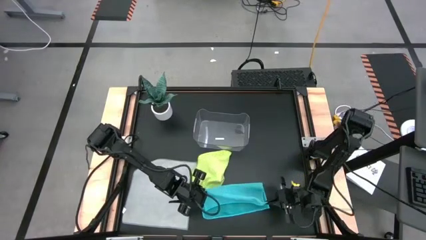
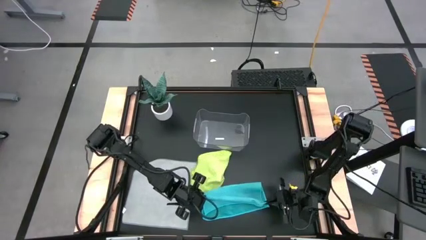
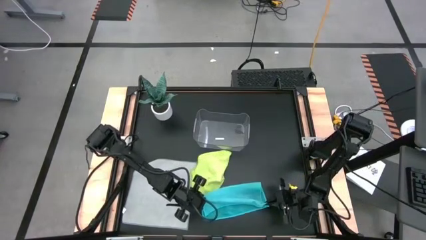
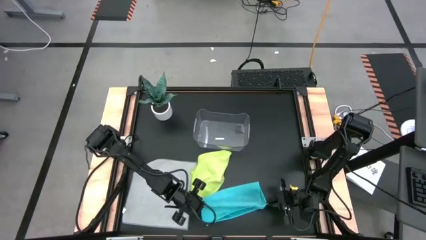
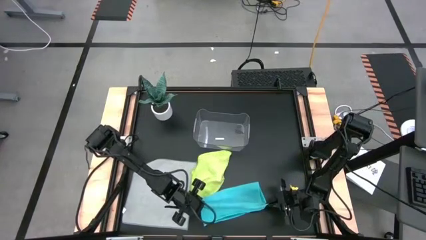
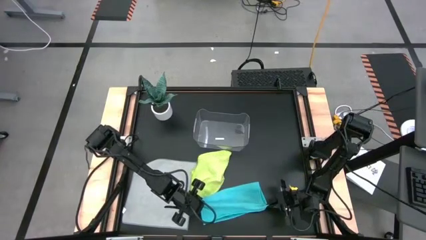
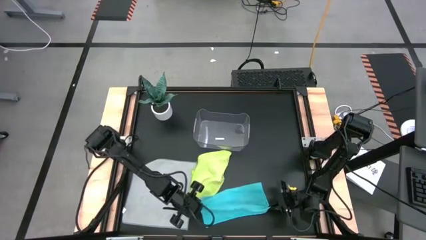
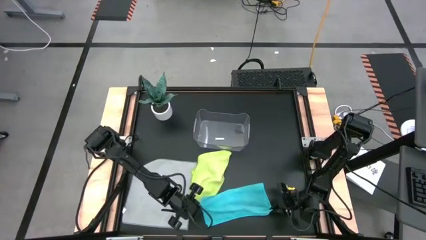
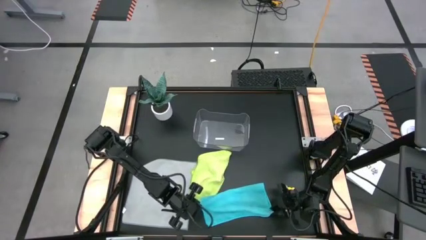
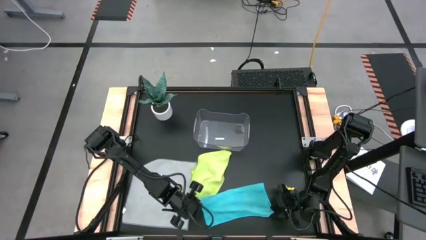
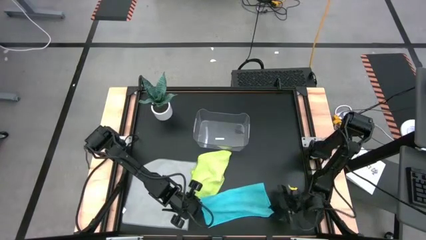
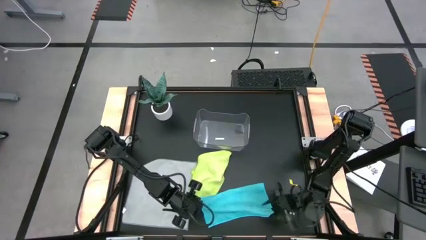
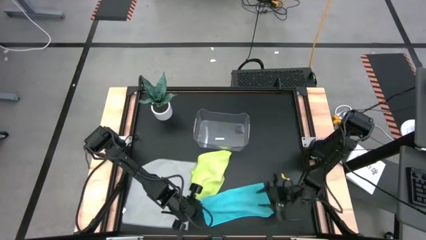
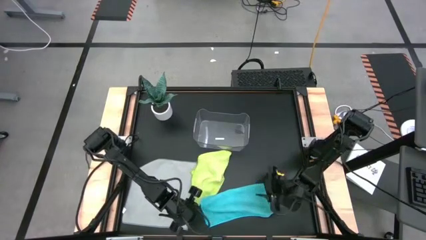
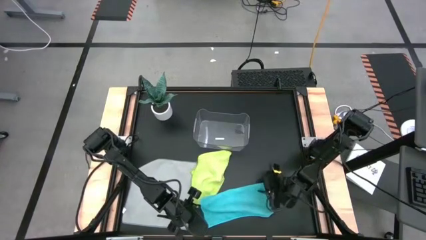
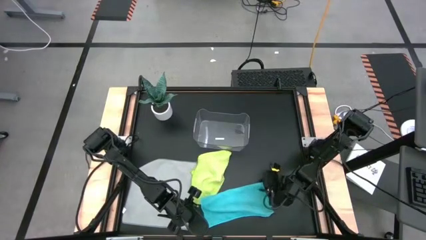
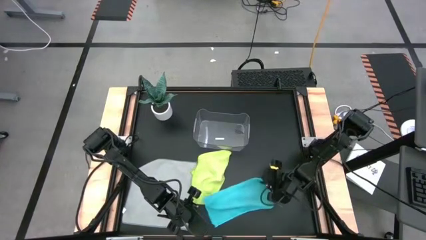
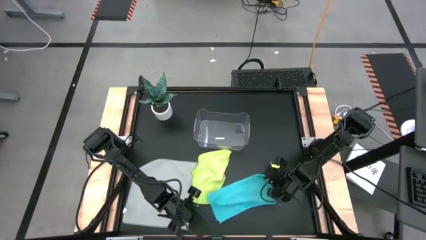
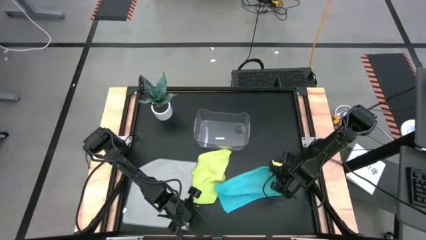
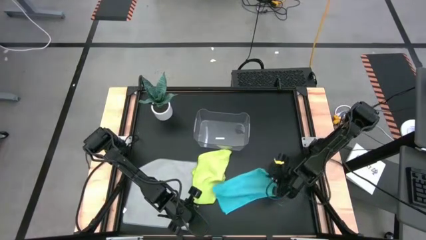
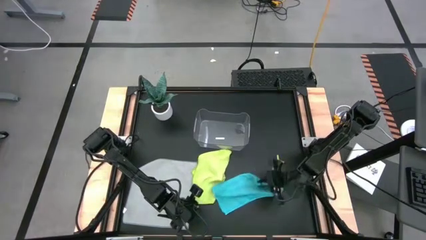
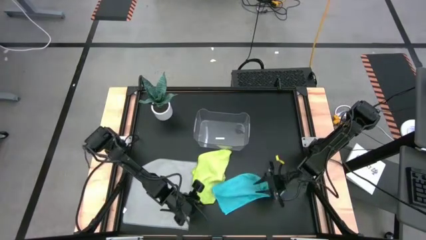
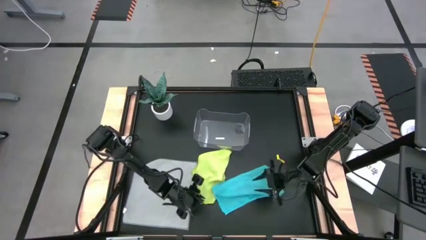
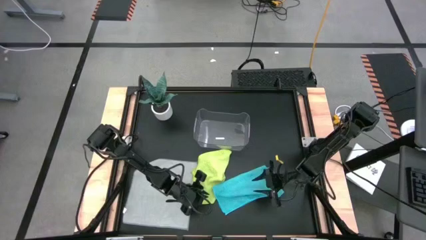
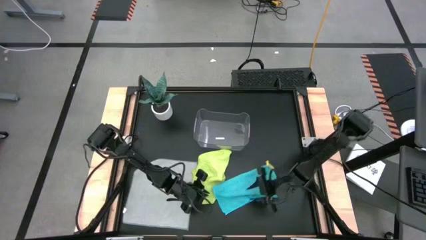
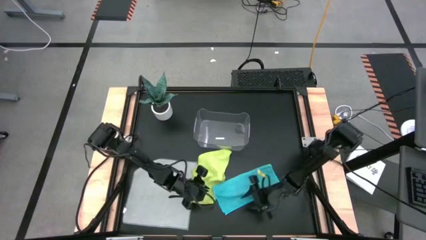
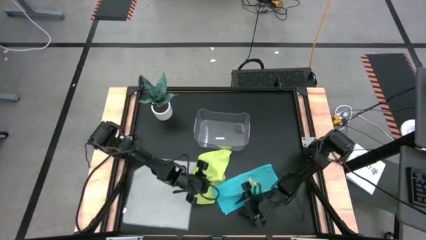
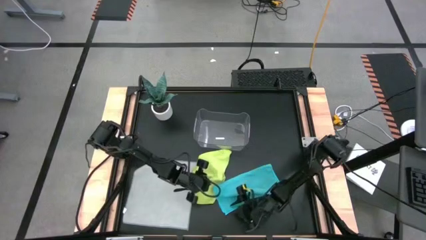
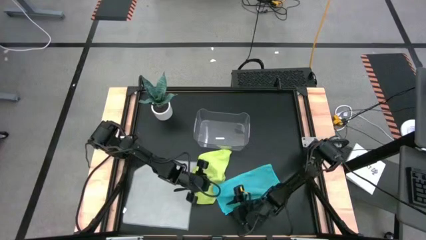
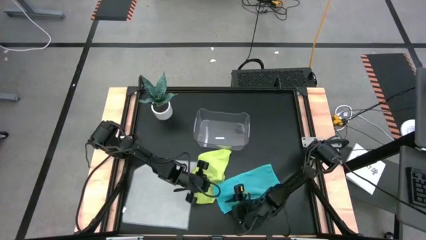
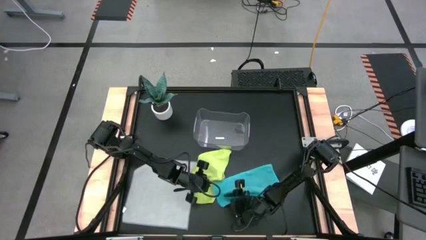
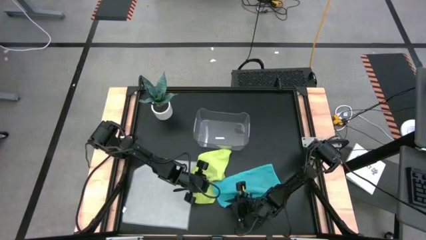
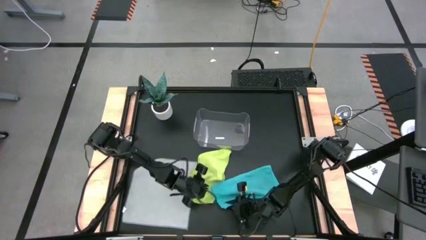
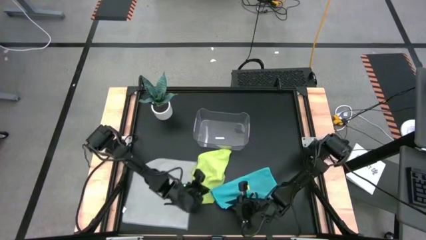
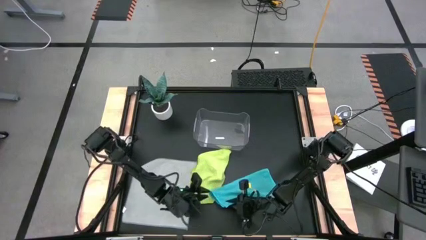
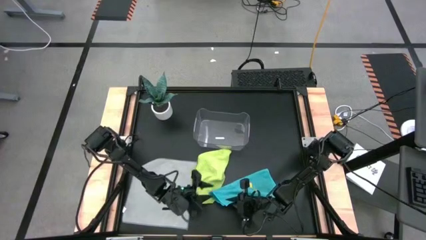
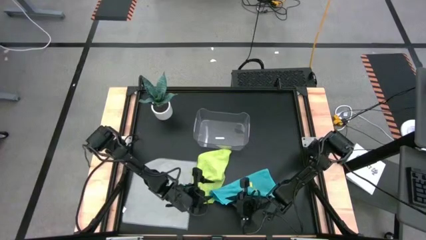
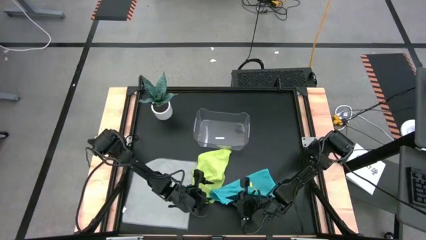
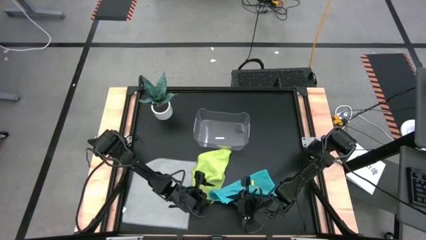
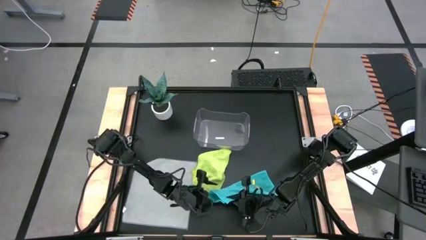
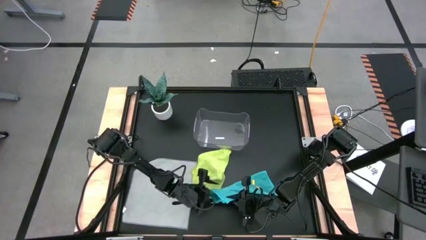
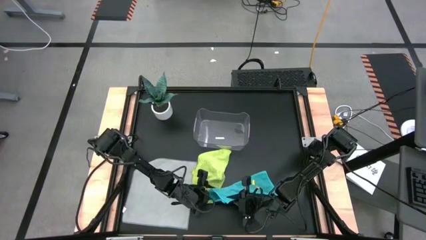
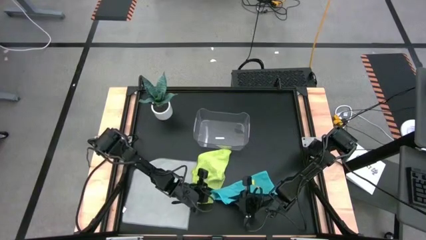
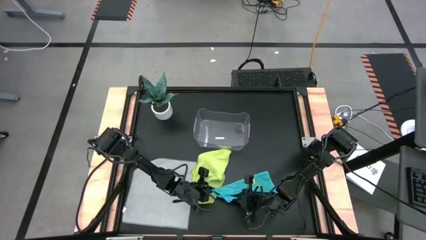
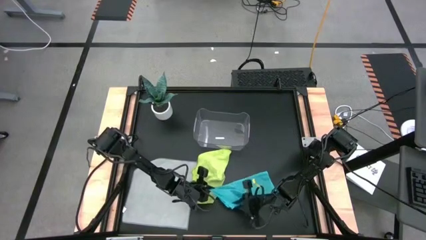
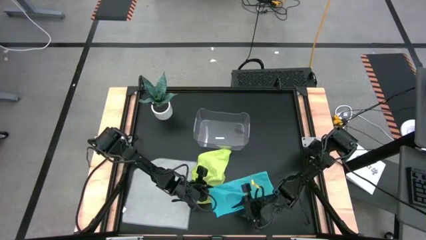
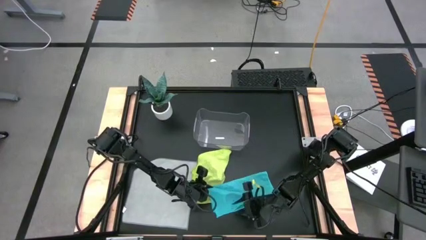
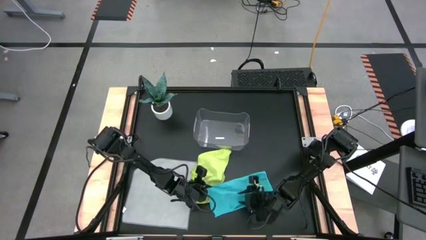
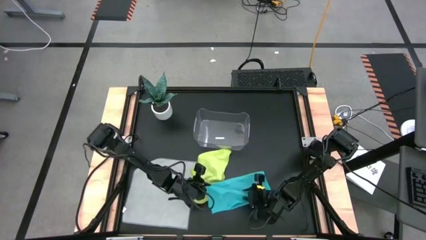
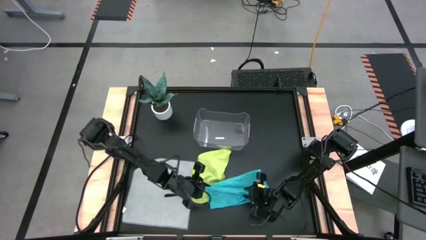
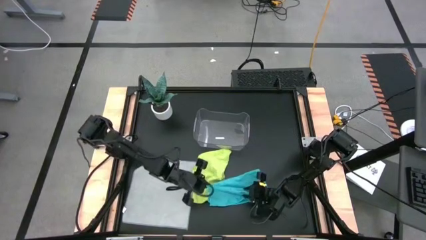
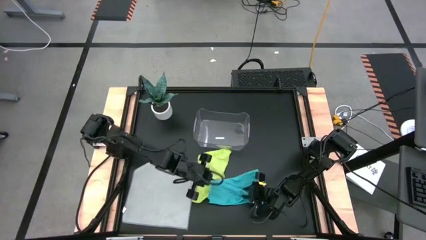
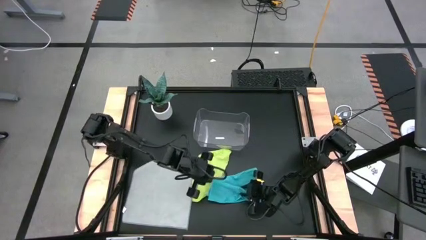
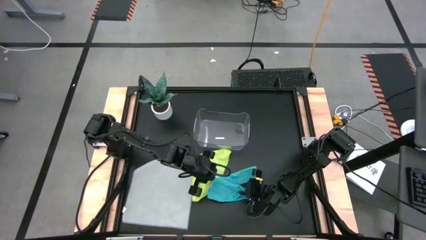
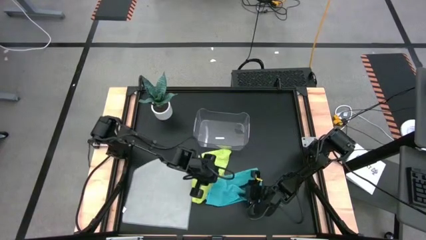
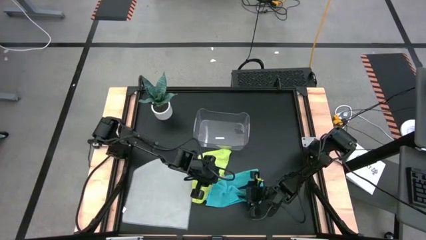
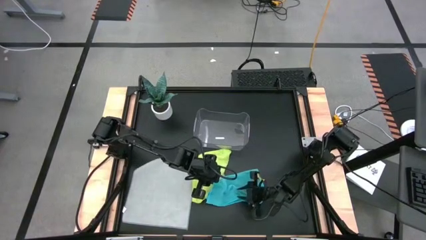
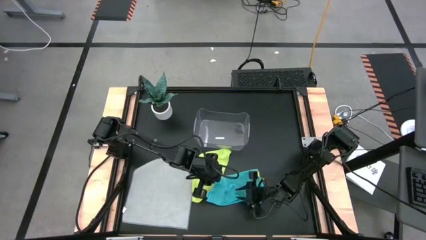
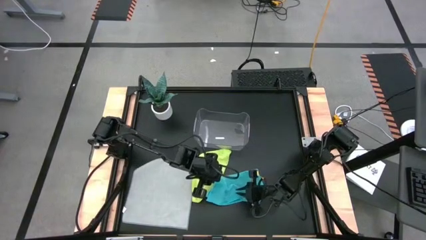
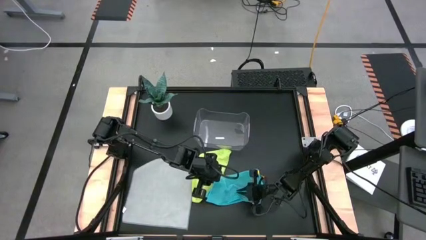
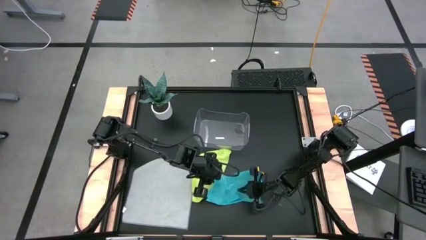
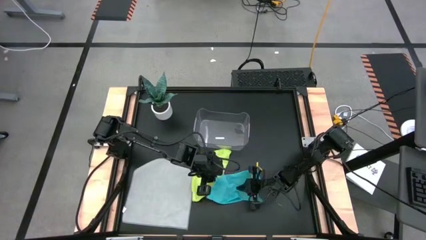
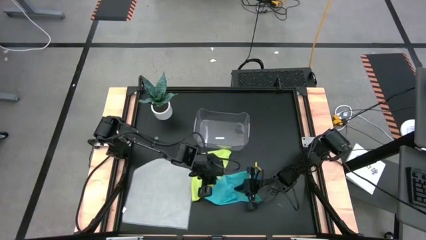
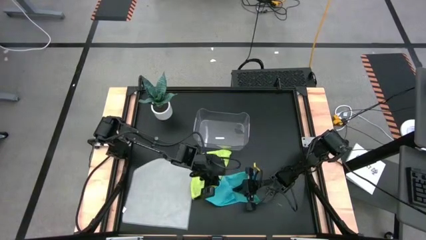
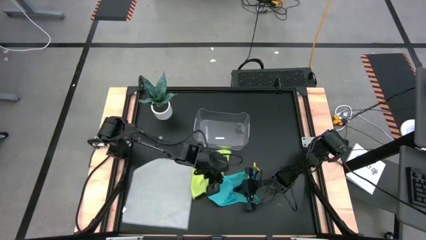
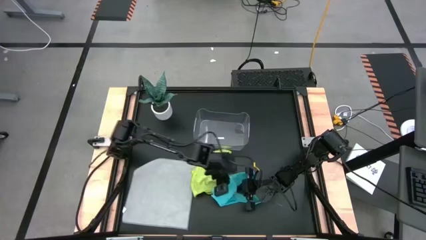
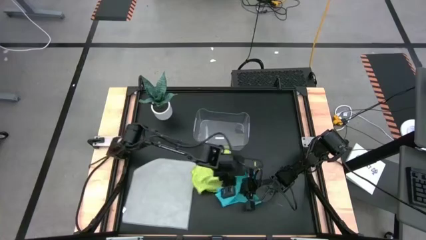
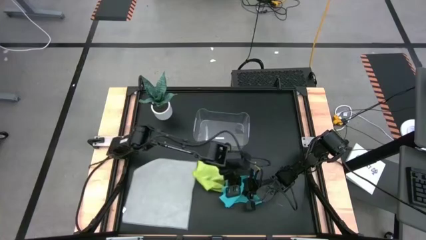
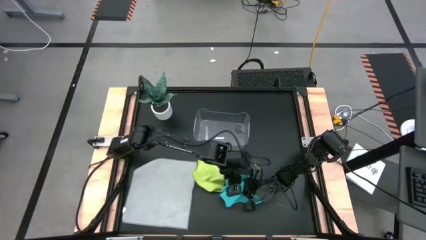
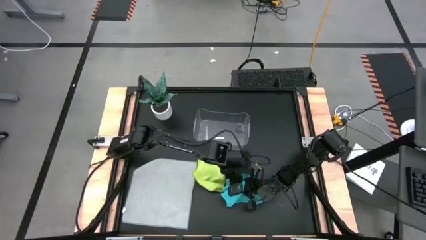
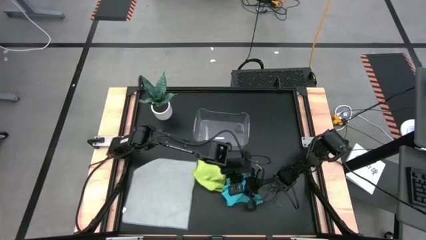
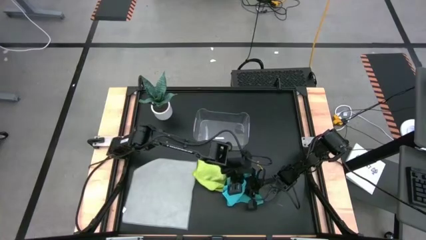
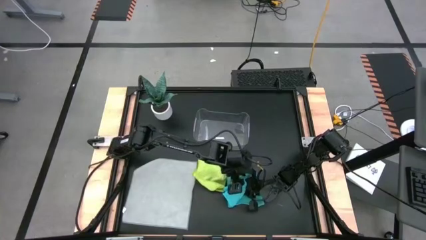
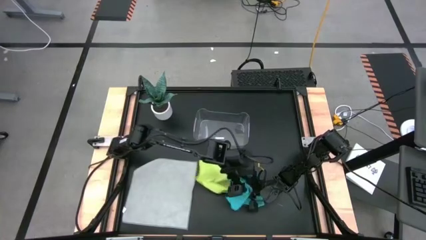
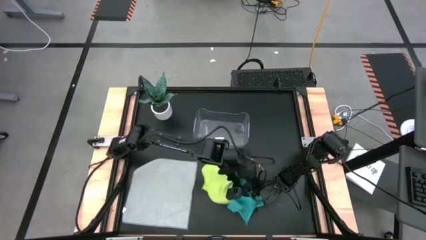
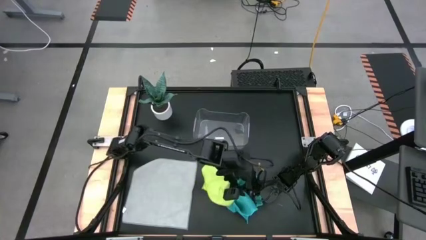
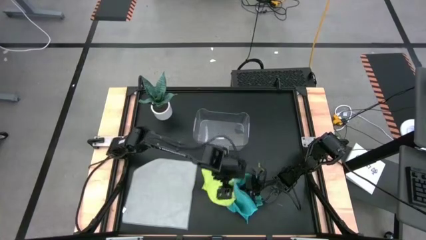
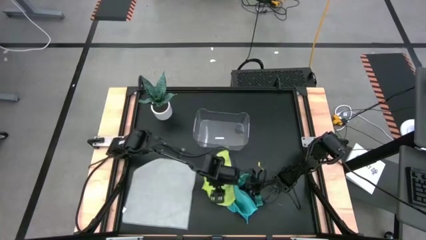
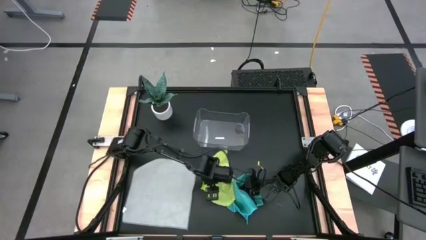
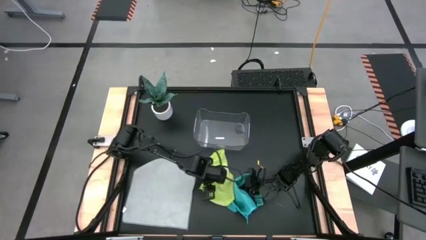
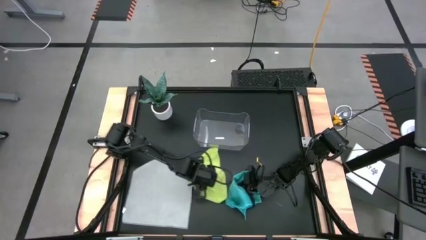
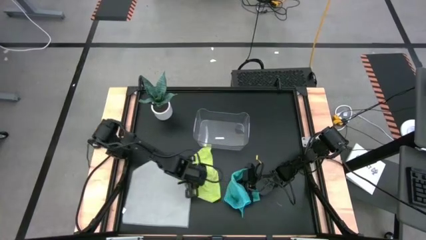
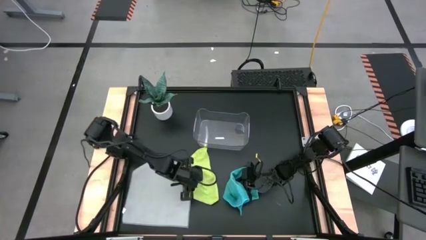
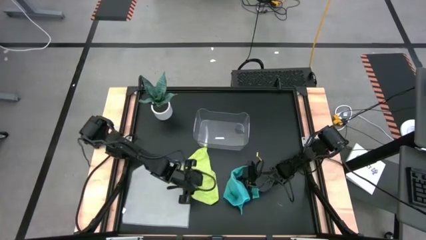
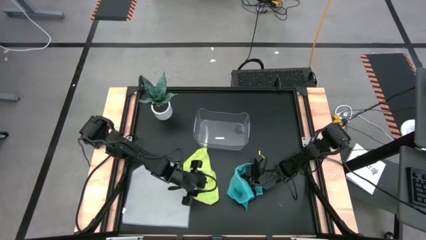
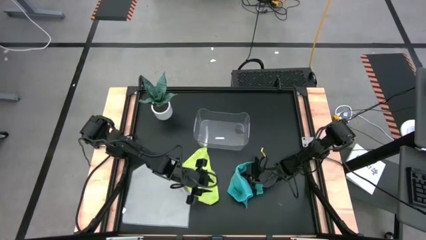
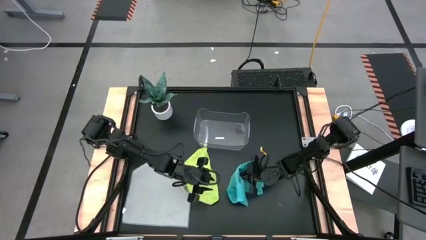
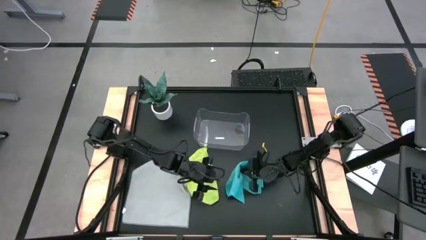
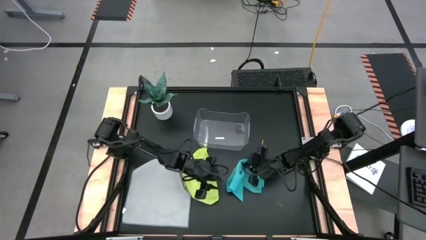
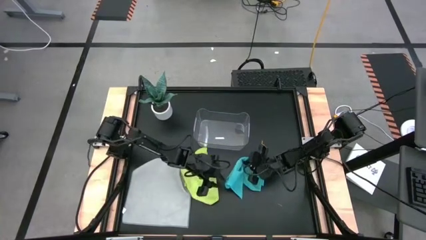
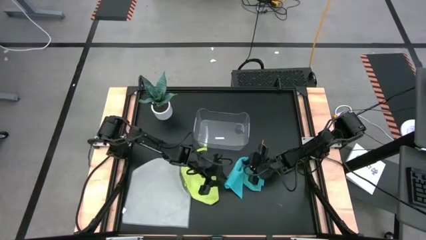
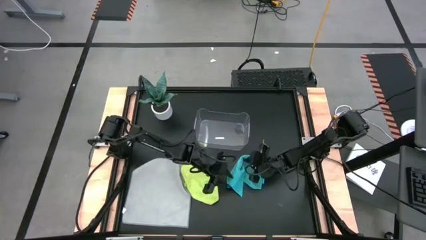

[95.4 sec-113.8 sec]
Task: Fold microfiber towels
Fold the blue towel
